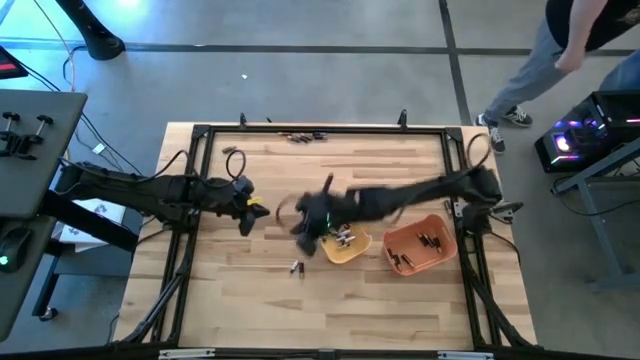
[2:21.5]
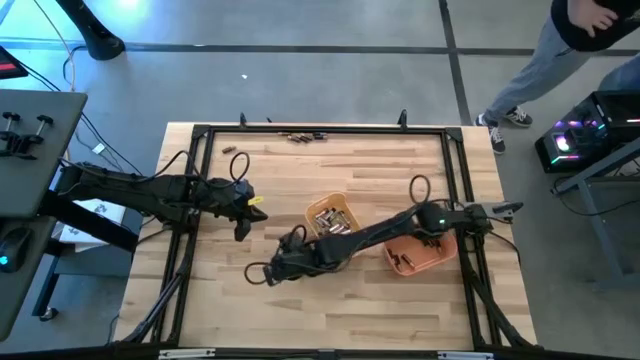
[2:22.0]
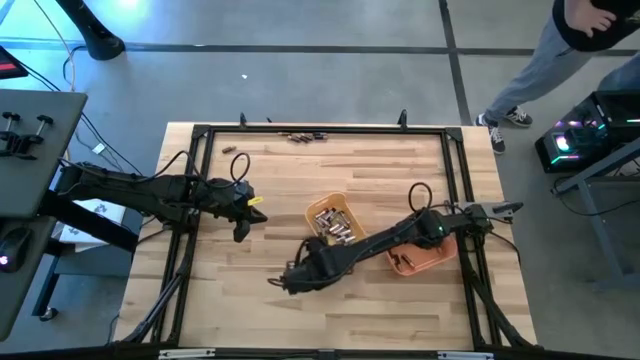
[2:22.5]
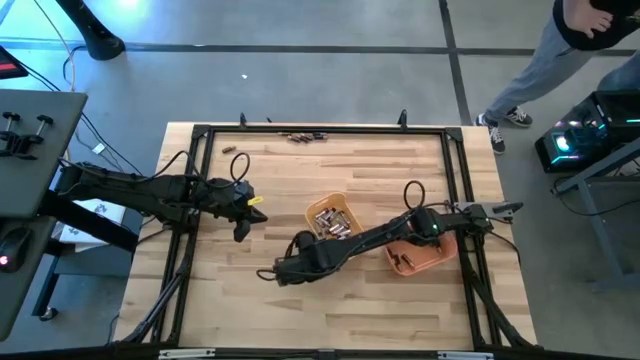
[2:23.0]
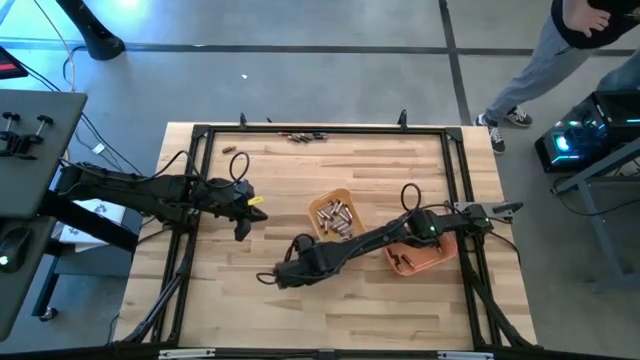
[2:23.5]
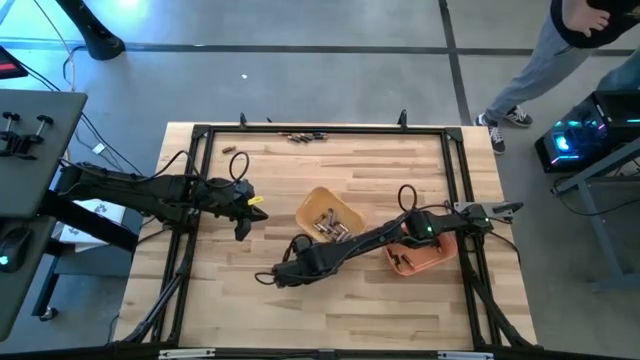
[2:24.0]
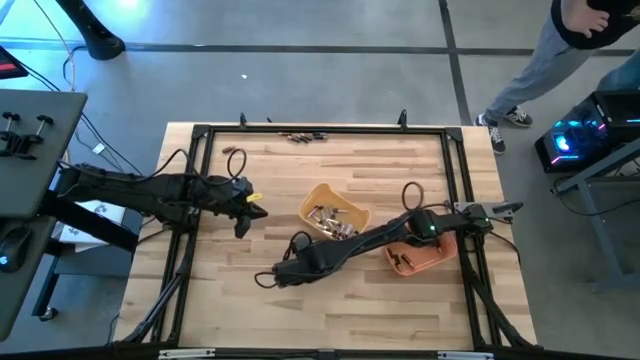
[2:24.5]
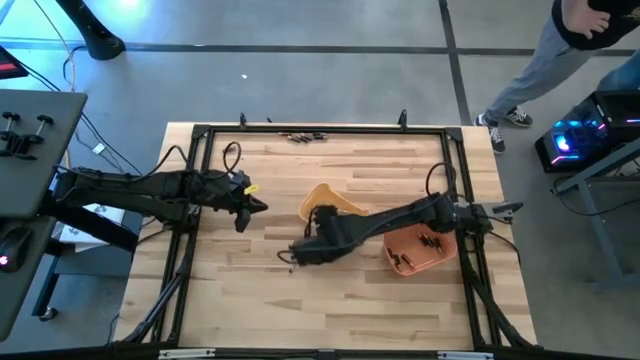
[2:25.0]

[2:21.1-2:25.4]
Task: Sort batteries
Put the black battery into the orange bin

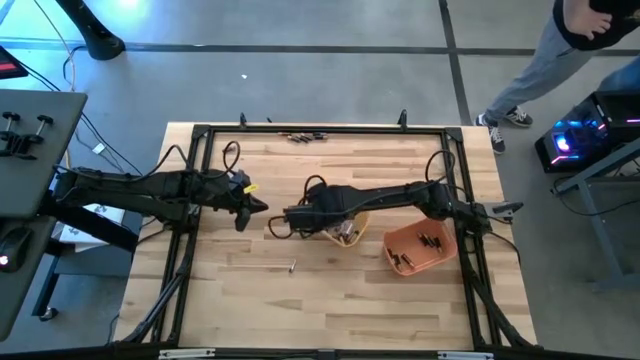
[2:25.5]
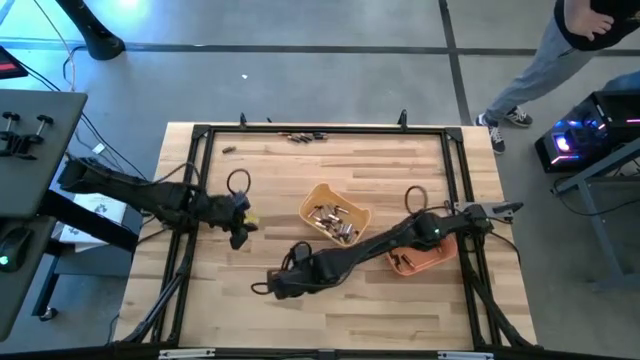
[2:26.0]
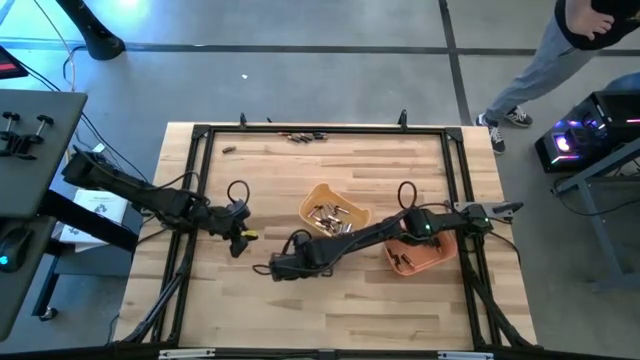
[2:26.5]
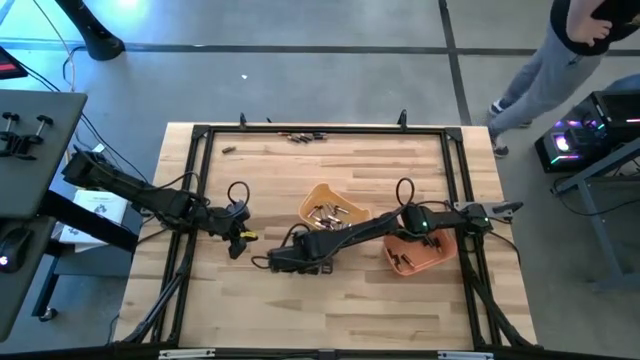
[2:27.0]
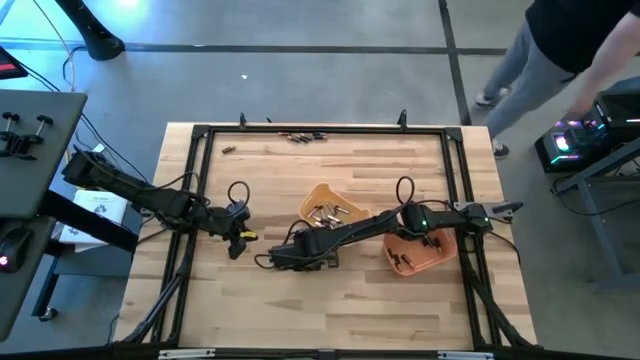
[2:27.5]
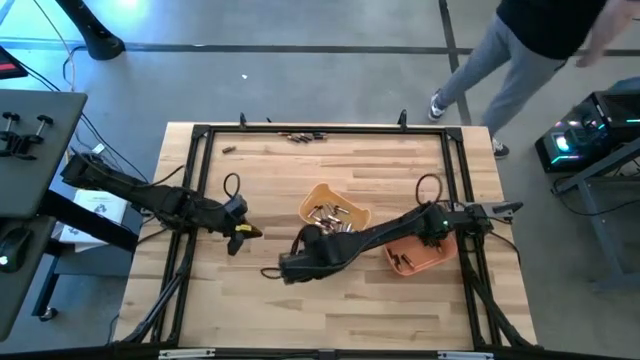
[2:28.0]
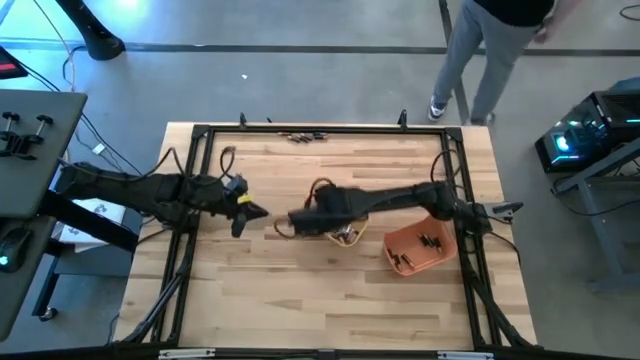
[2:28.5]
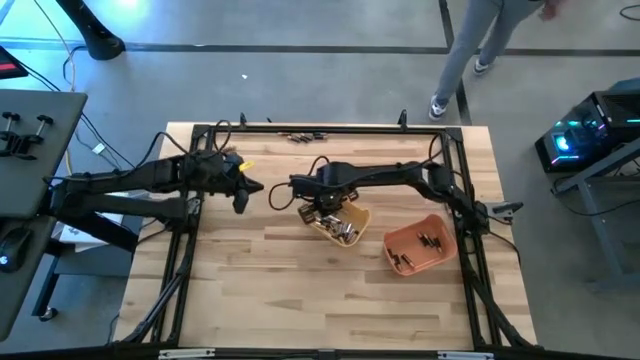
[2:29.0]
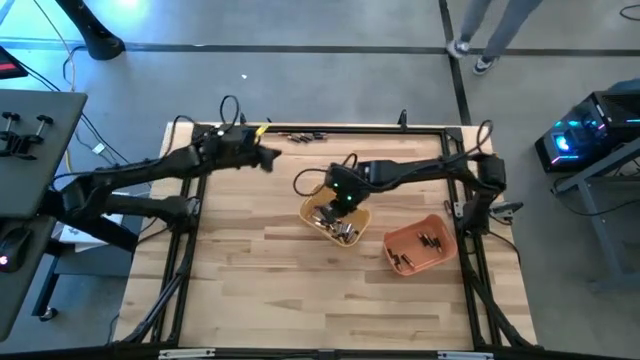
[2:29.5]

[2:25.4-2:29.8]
Put the silver battery into the yellow bin

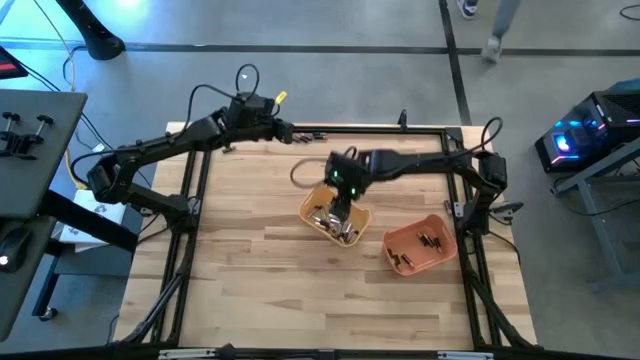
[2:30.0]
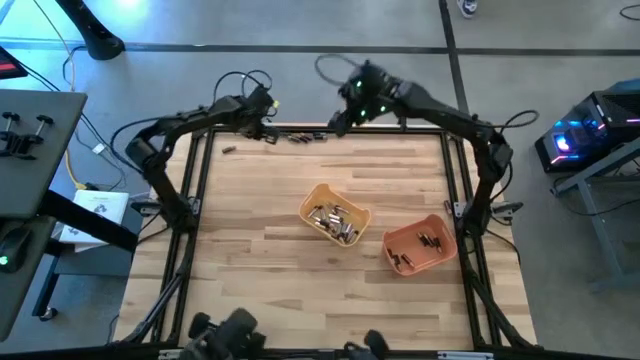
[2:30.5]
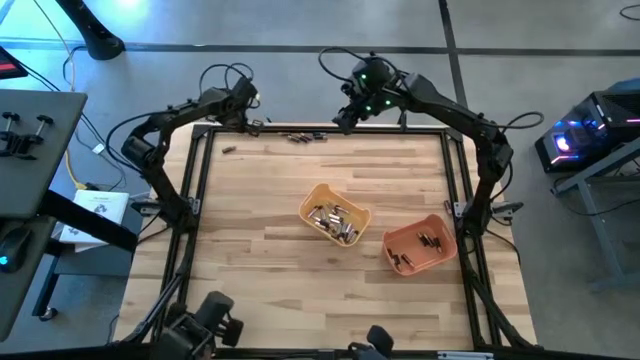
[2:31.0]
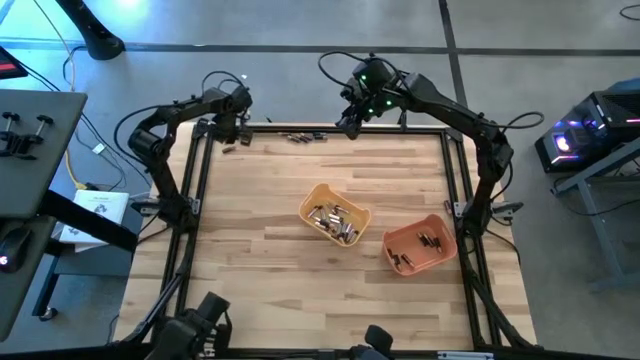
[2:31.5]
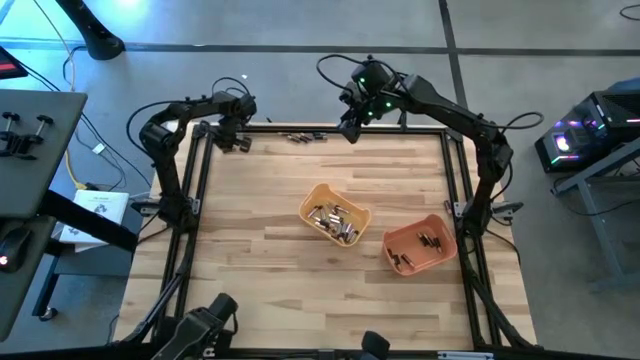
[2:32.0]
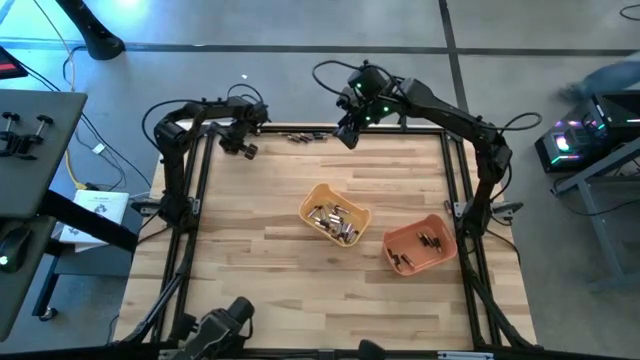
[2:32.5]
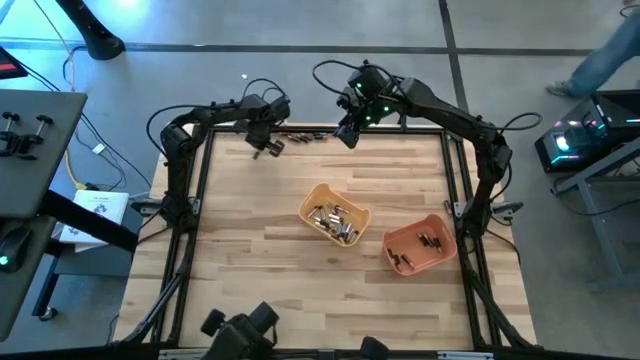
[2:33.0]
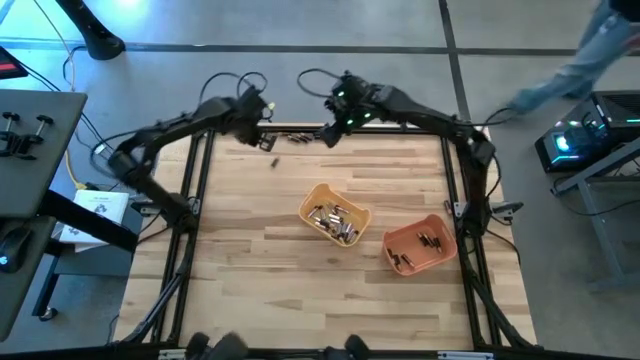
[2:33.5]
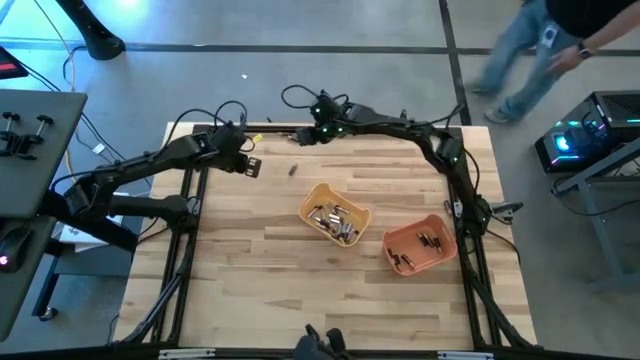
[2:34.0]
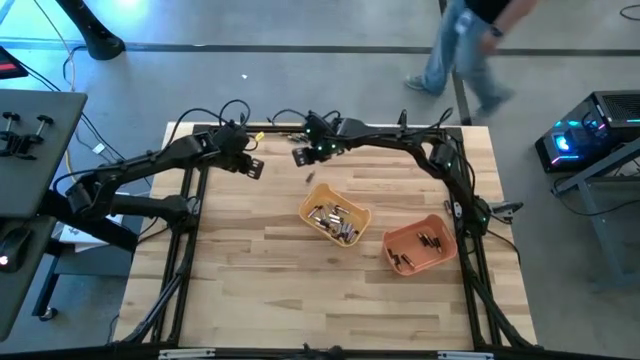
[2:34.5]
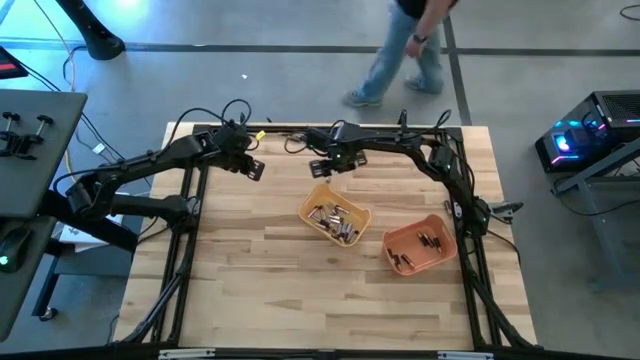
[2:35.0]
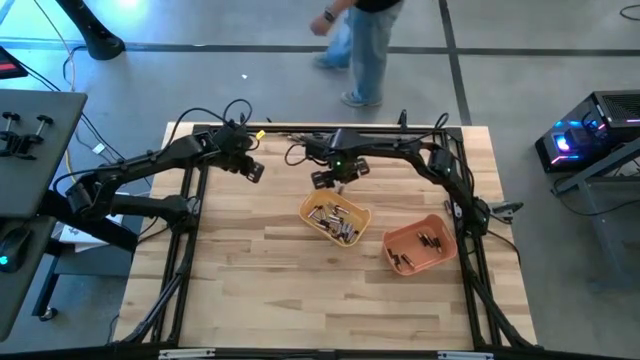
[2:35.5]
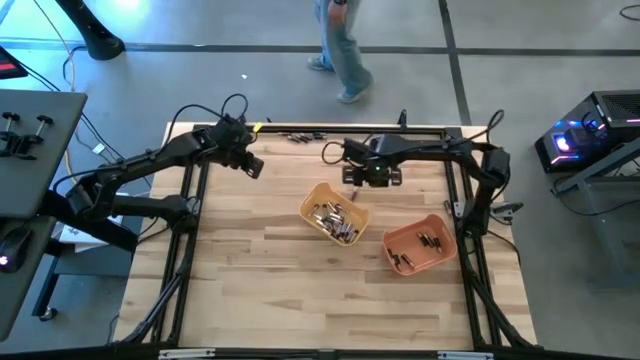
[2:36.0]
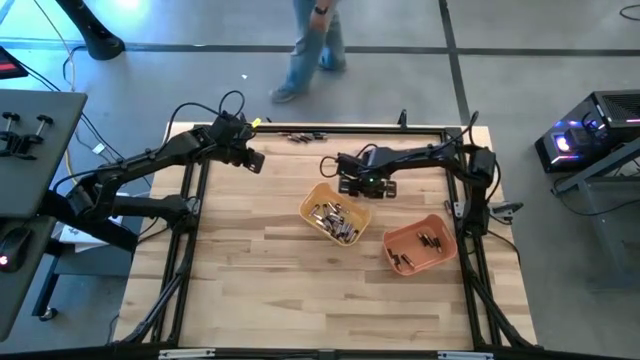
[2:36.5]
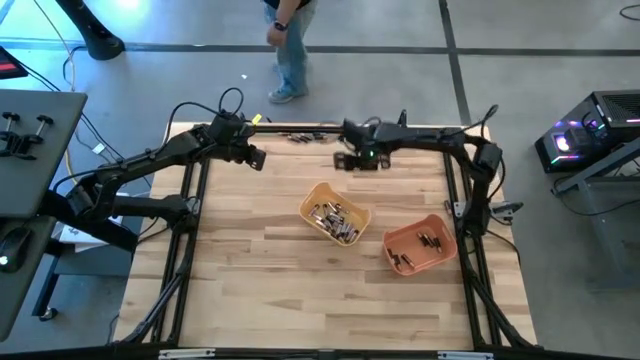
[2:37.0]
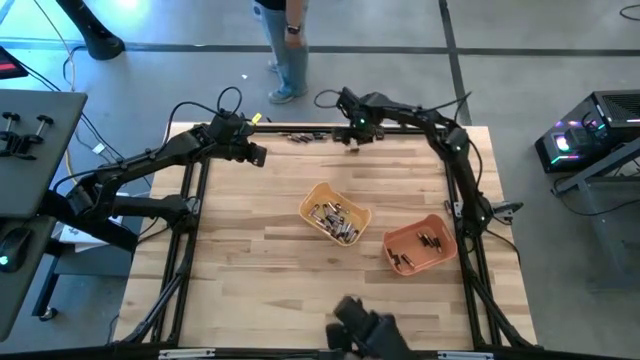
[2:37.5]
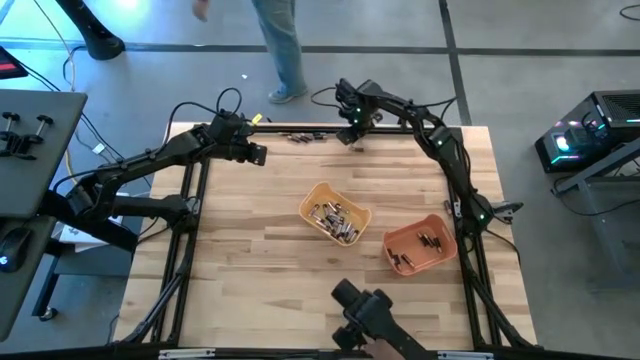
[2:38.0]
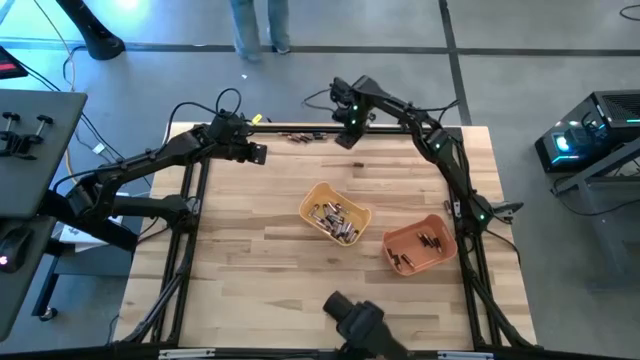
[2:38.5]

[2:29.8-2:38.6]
Put the black battery into the orange bin

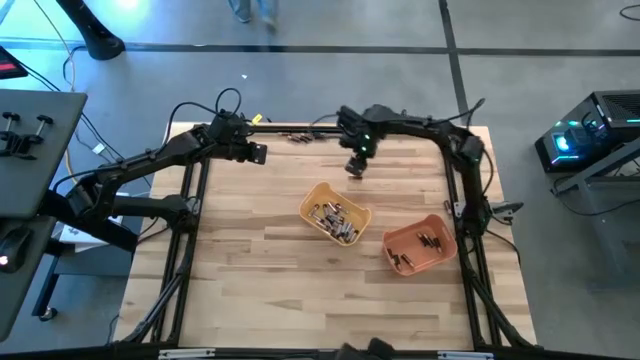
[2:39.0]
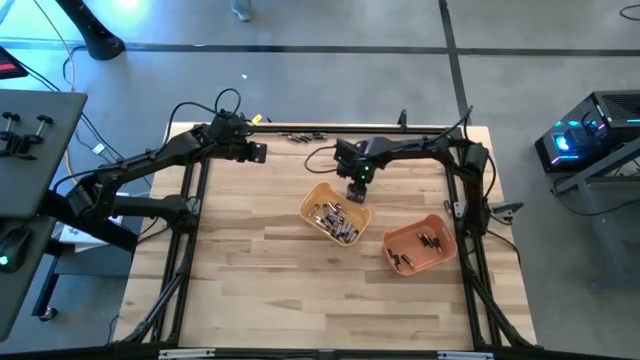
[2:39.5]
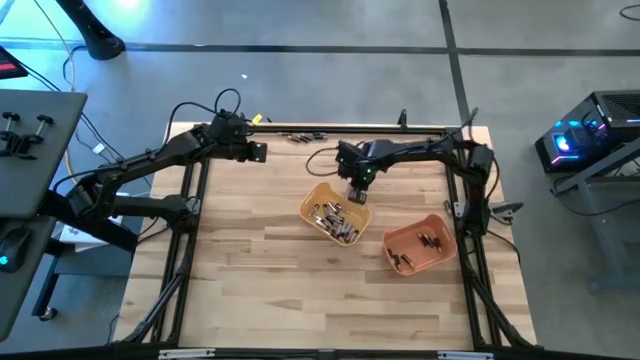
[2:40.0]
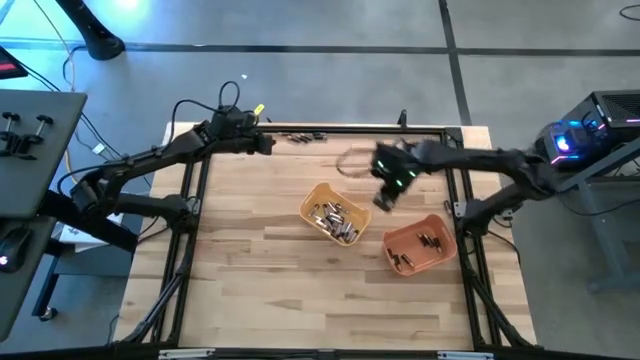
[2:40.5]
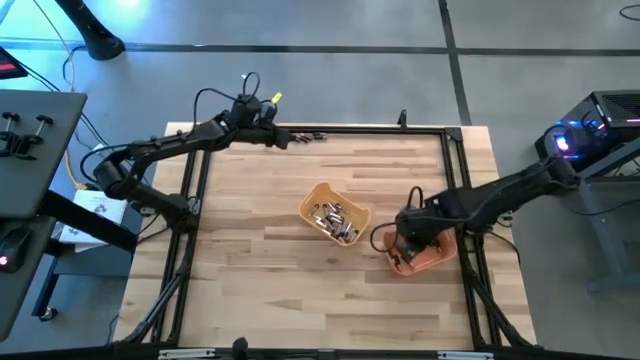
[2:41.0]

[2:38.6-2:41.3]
Put the black battery into the orange bin

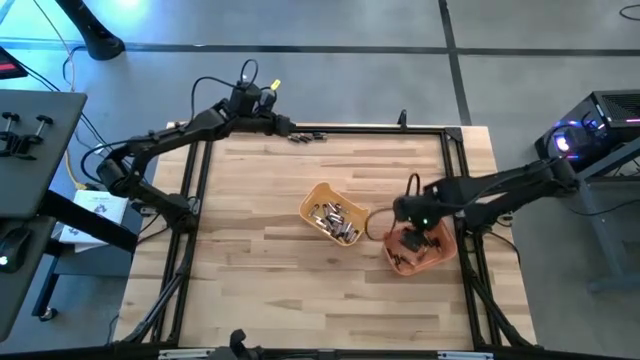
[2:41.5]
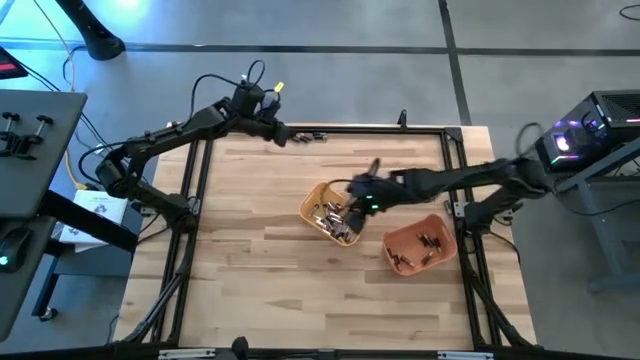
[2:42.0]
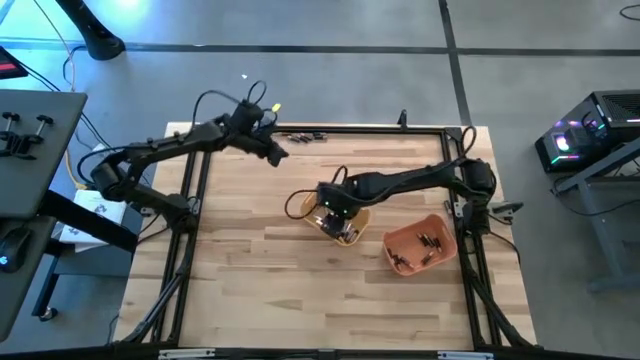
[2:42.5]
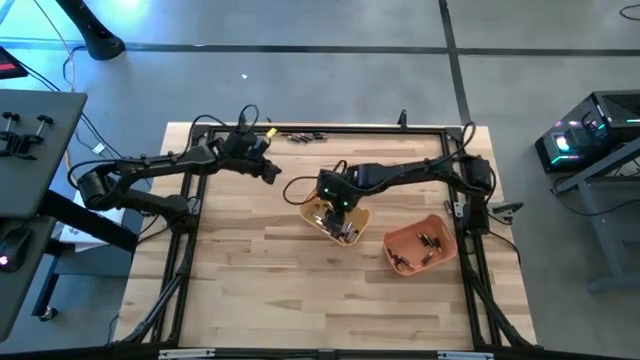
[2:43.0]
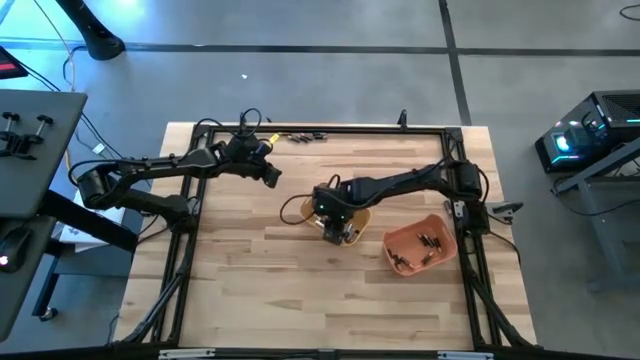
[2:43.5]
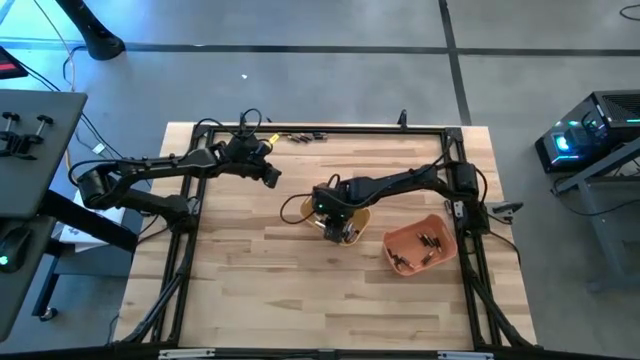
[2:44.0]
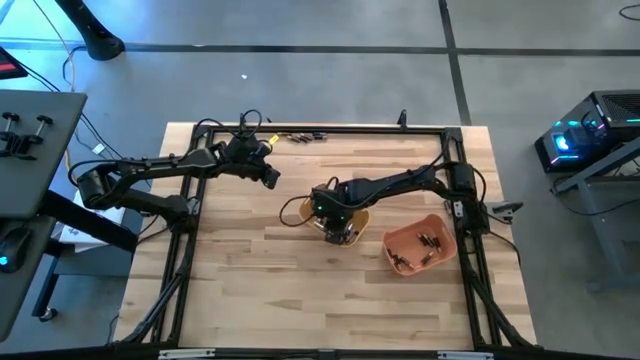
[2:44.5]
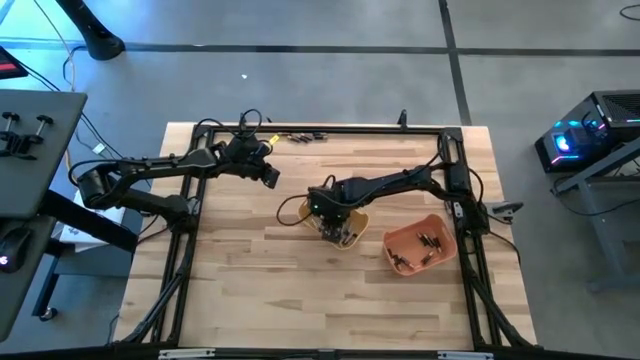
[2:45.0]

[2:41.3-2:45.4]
Move the black battery at the yellow bin to the orange bin
